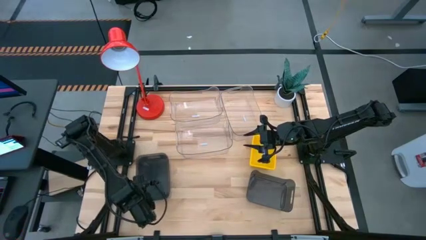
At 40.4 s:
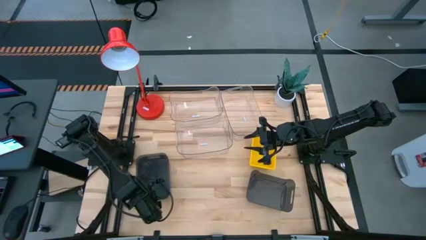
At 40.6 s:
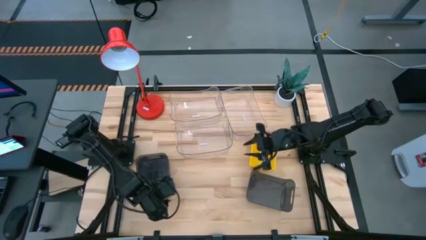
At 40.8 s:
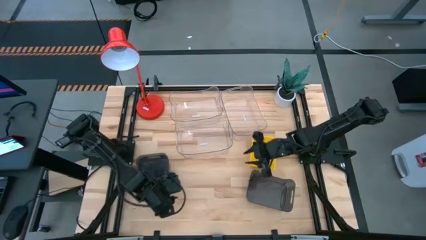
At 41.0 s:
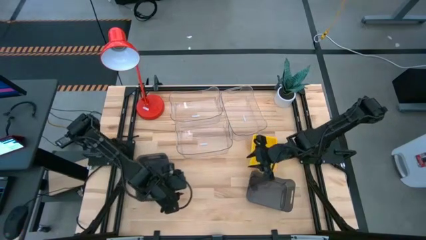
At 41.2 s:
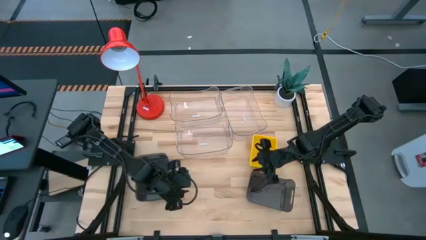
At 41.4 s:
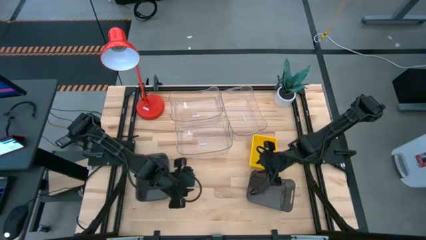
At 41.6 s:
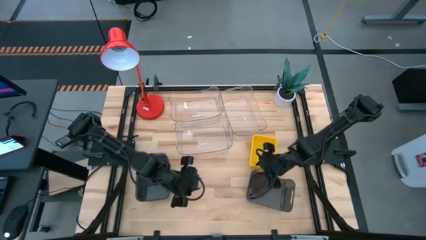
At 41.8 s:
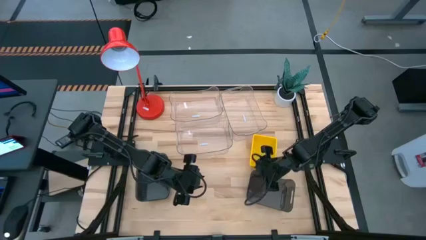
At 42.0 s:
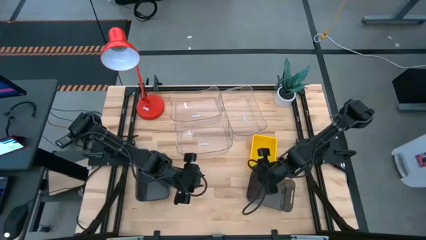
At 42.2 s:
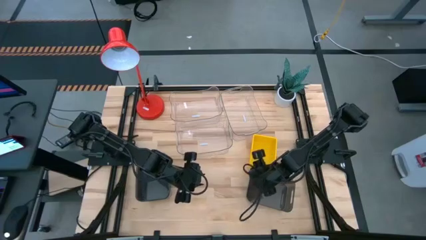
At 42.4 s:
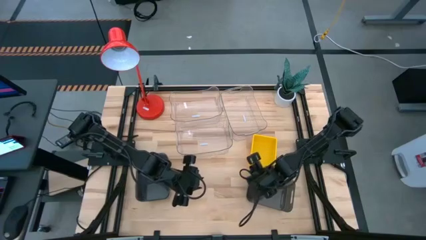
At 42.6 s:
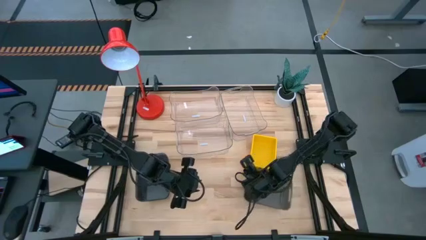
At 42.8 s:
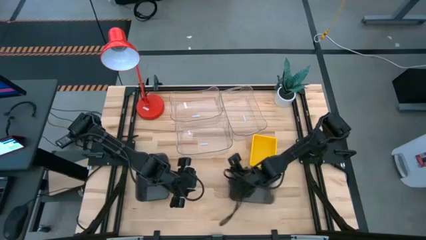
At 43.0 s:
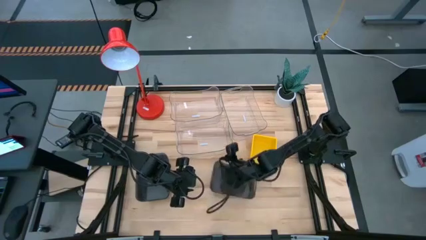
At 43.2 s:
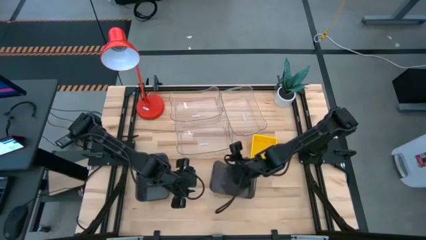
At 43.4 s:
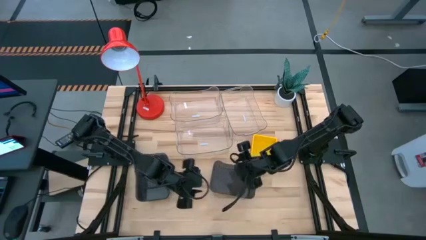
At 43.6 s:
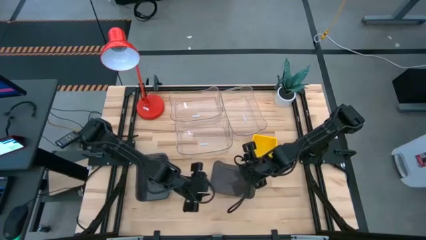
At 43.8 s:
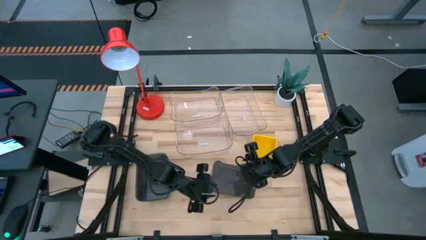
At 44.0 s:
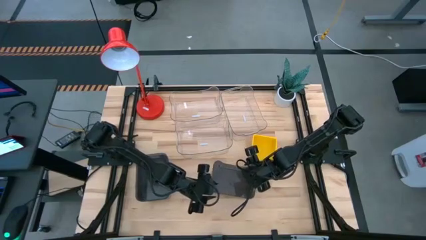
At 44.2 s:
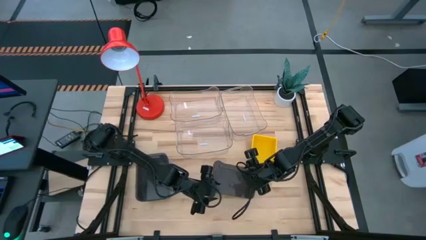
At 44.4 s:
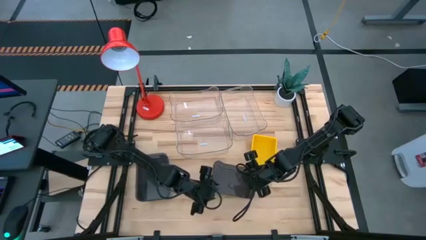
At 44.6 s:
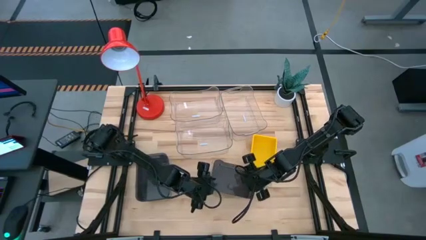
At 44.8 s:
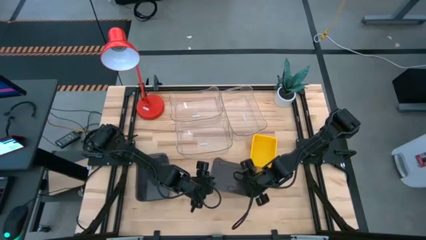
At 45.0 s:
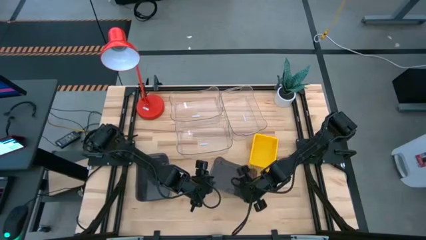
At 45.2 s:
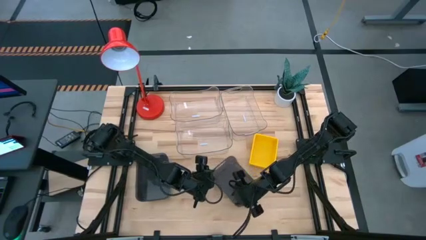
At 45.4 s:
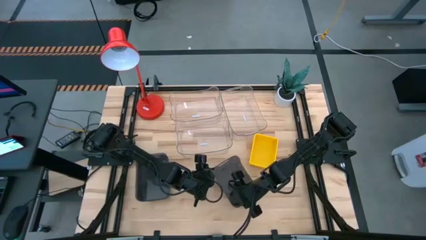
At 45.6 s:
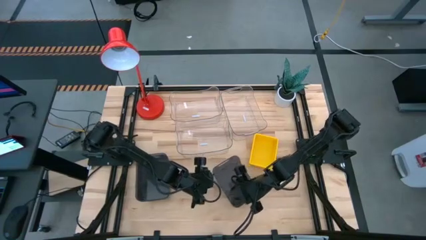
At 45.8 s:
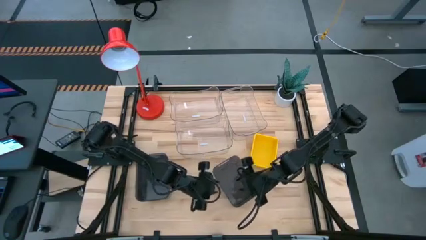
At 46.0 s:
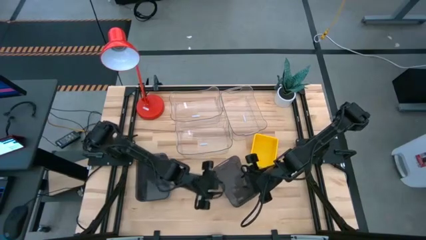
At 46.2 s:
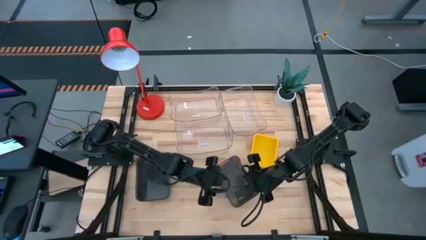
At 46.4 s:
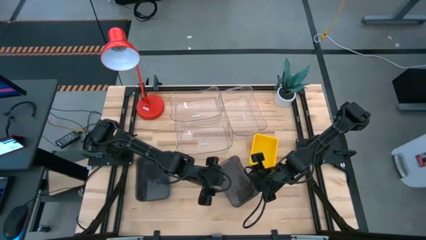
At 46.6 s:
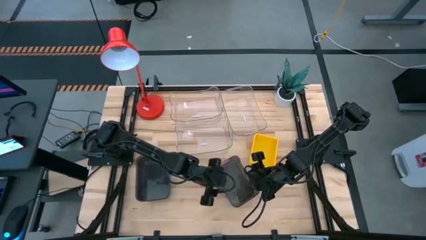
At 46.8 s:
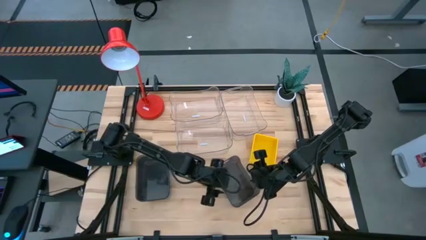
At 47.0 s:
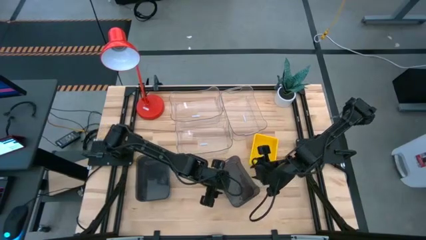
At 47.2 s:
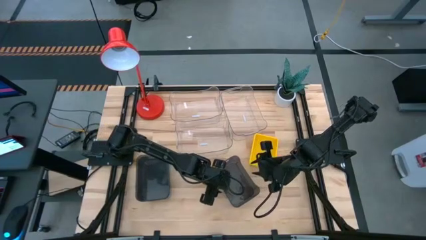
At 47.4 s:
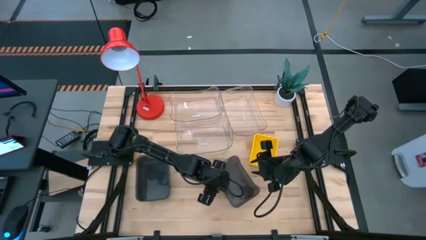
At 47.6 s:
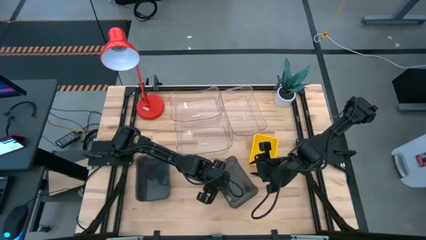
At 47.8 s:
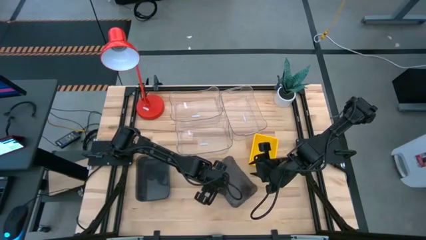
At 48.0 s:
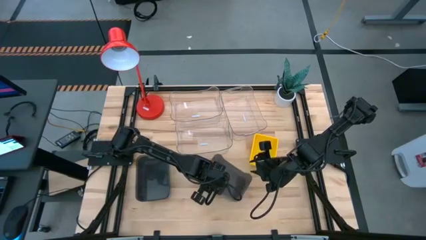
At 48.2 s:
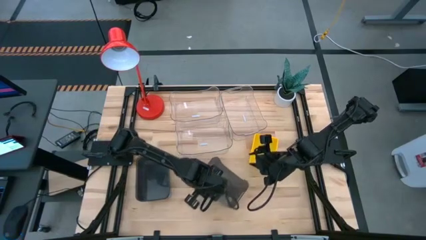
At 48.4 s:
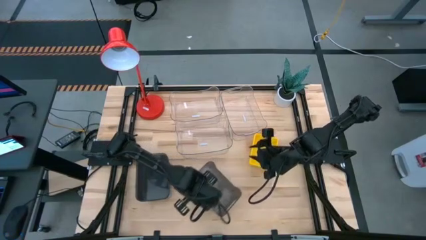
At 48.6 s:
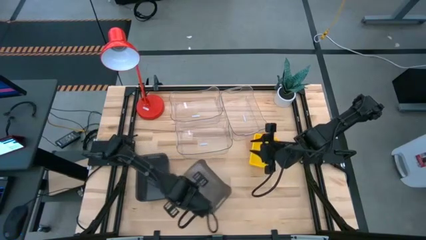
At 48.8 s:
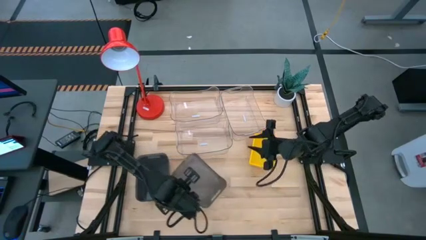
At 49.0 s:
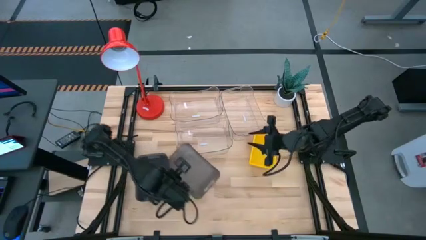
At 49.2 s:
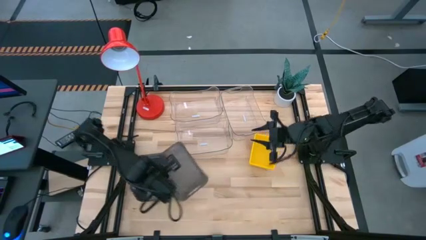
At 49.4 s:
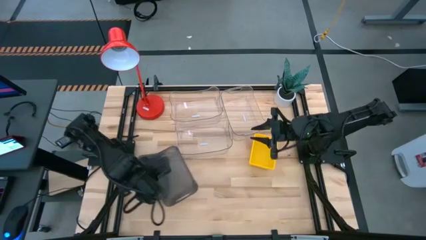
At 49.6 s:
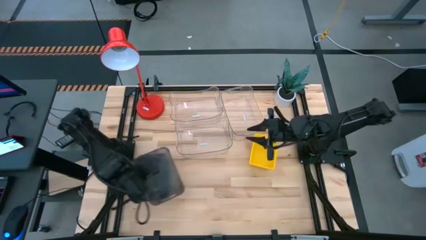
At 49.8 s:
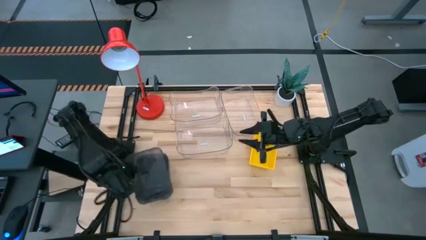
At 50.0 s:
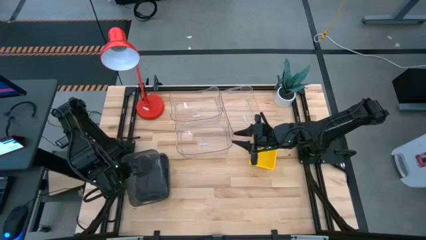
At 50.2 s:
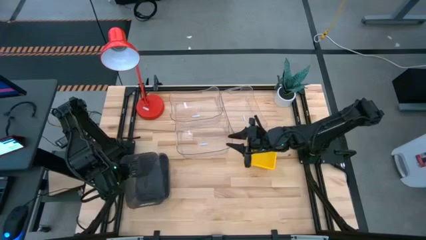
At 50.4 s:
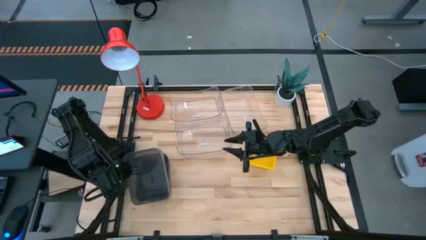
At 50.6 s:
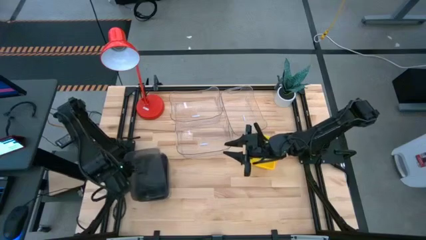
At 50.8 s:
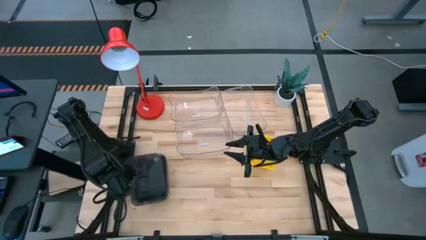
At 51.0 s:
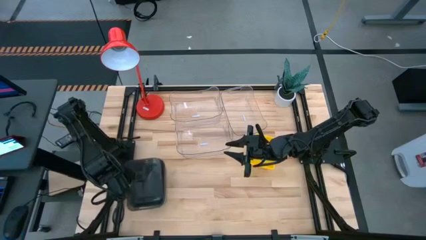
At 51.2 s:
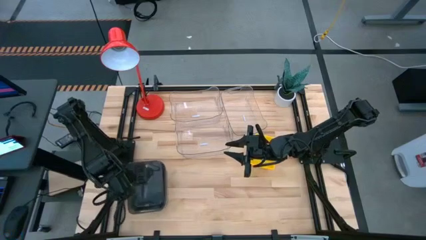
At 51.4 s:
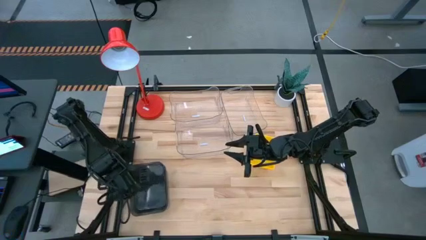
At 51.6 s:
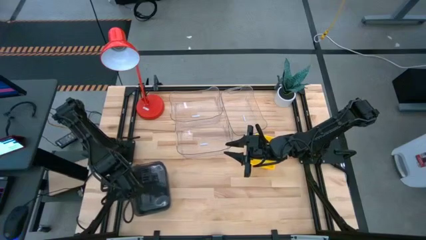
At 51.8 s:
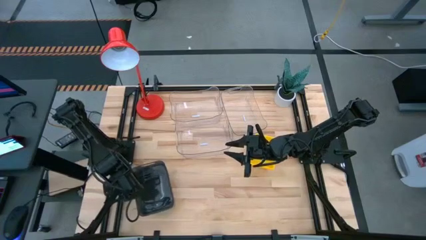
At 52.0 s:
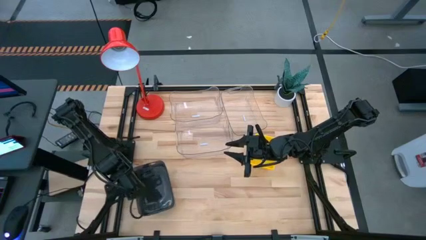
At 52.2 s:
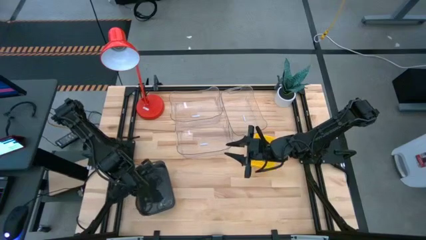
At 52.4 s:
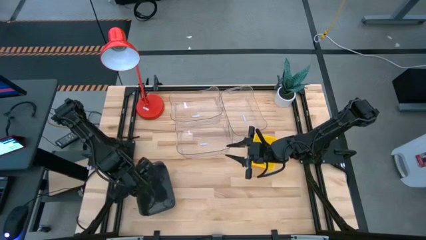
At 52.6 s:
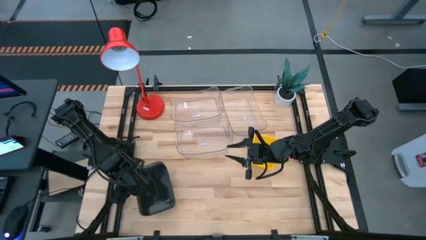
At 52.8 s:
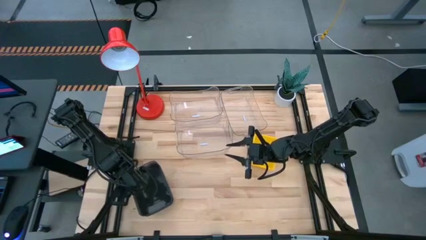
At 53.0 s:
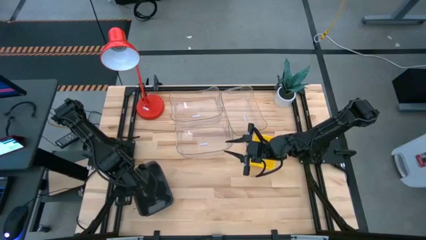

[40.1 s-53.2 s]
Stack the right black bin on top of the stacked black bins

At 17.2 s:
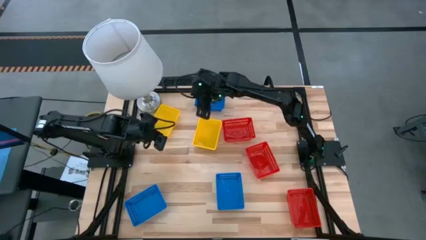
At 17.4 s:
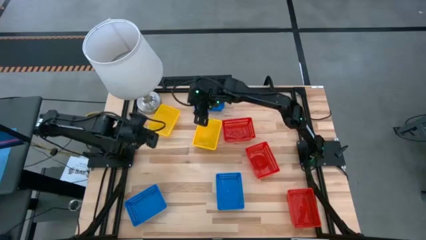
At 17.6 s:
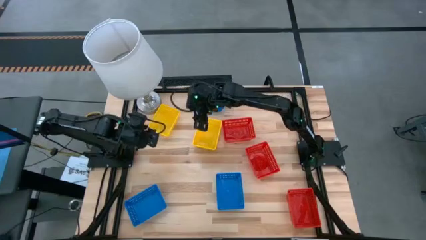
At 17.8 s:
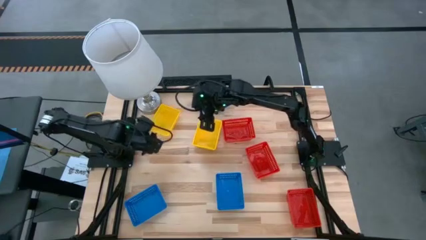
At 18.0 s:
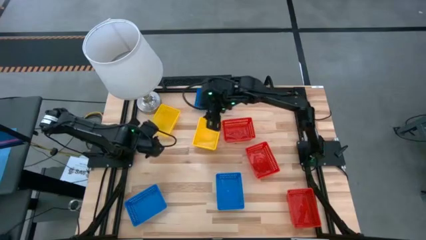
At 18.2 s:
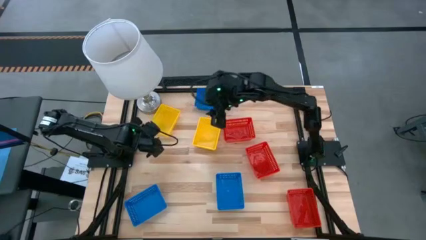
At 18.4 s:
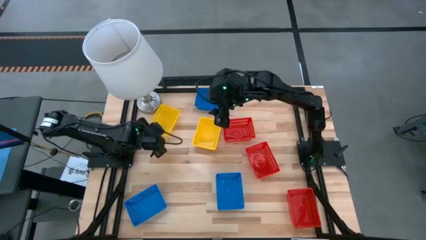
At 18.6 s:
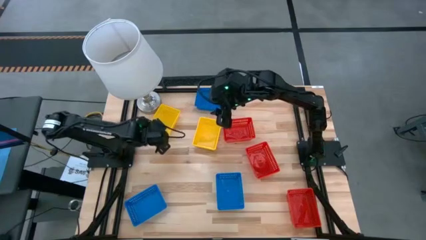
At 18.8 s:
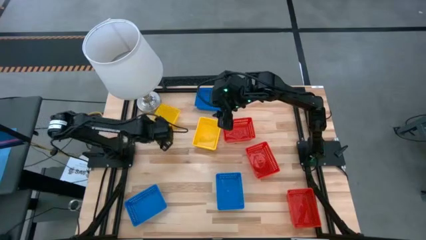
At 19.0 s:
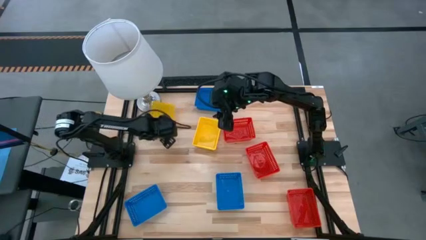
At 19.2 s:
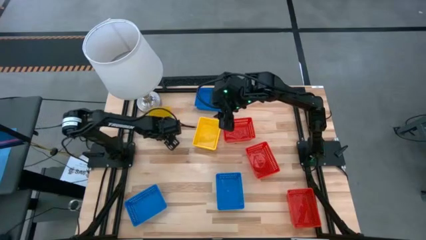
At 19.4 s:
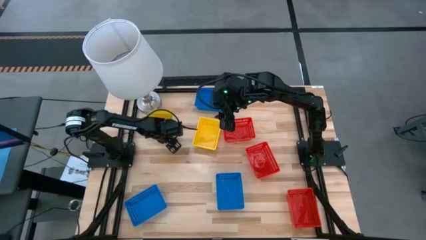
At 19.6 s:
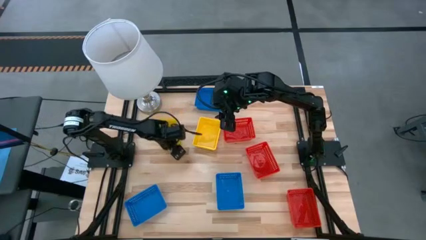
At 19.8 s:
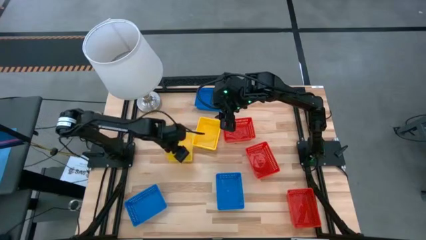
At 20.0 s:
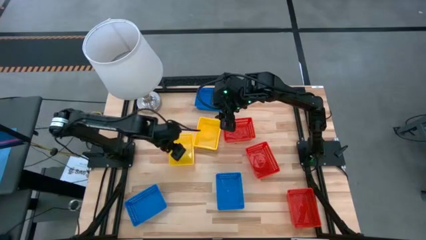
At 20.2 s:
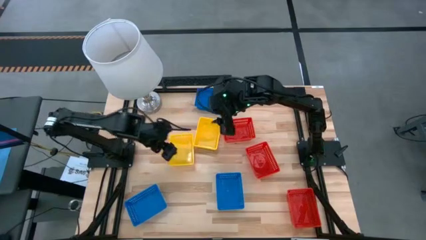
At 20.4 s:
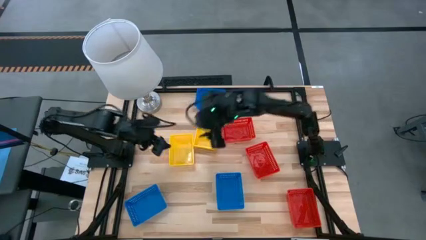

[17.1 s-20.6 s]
Move the top left yellow basket to the center of the table
